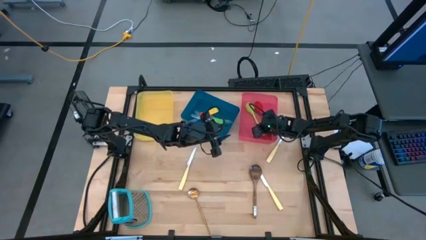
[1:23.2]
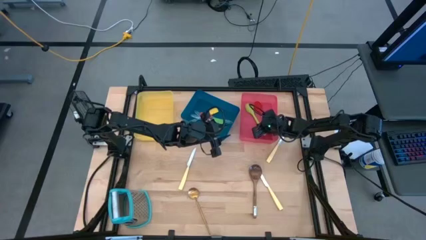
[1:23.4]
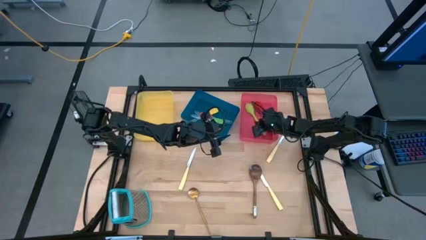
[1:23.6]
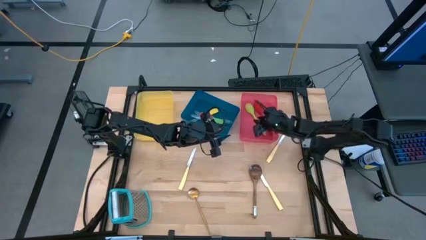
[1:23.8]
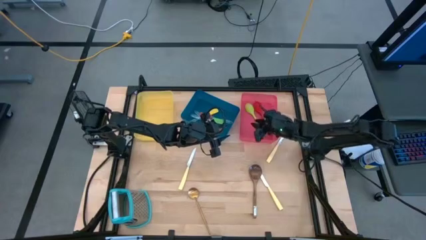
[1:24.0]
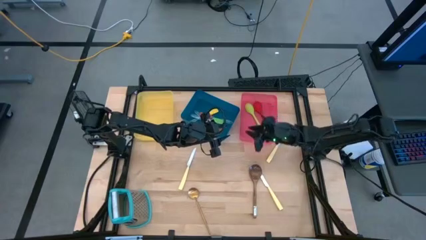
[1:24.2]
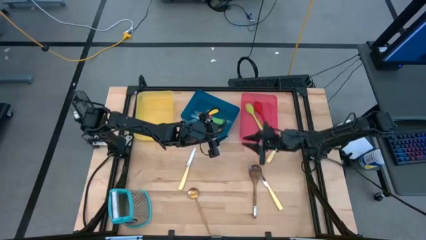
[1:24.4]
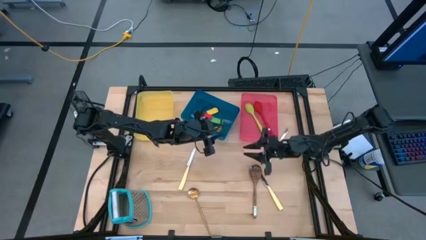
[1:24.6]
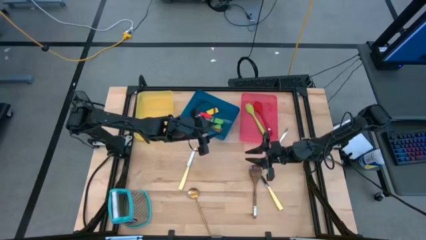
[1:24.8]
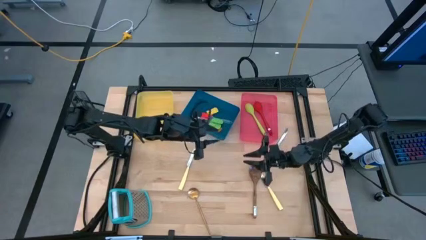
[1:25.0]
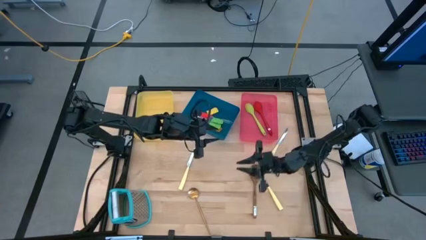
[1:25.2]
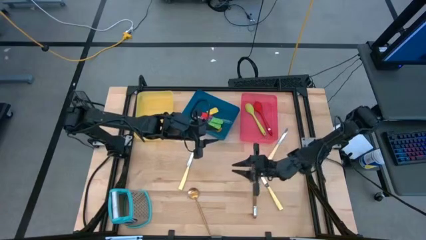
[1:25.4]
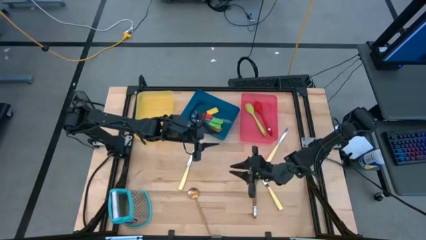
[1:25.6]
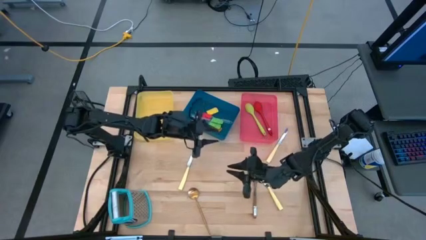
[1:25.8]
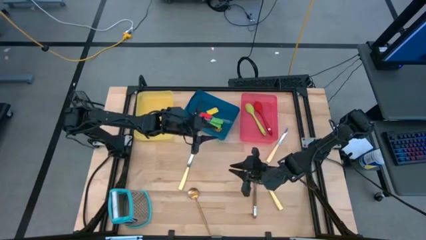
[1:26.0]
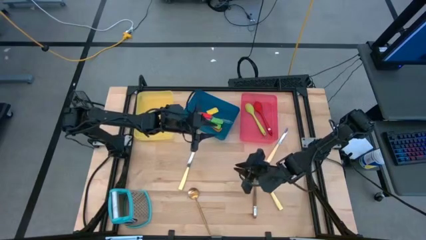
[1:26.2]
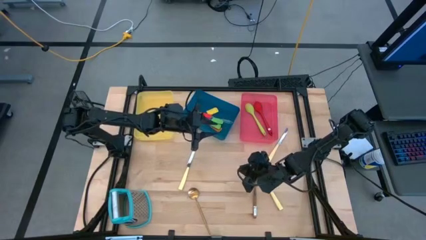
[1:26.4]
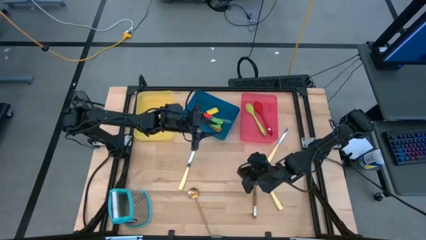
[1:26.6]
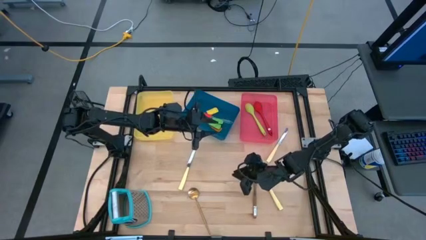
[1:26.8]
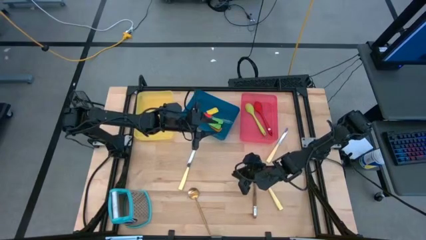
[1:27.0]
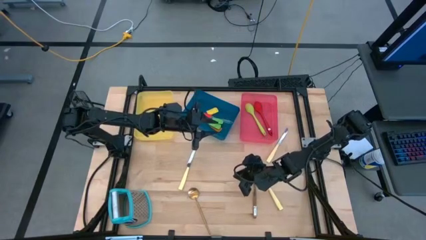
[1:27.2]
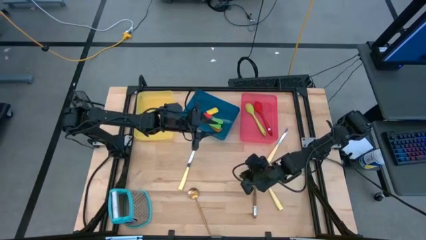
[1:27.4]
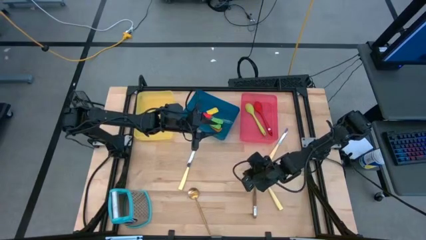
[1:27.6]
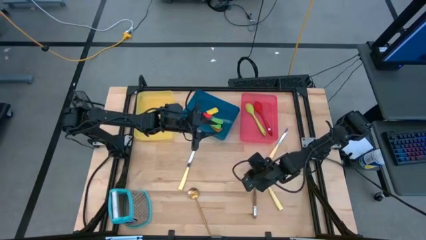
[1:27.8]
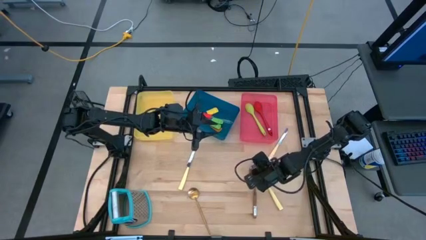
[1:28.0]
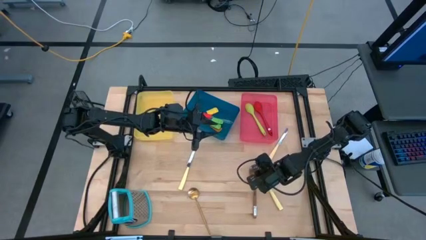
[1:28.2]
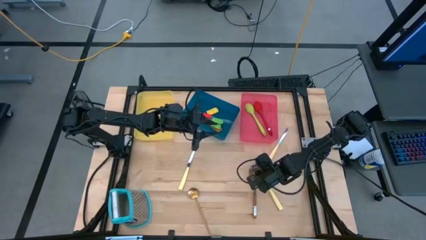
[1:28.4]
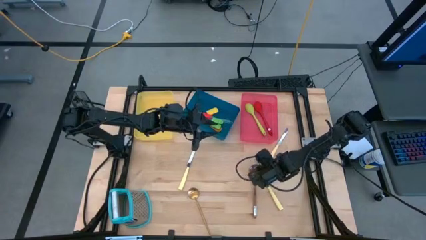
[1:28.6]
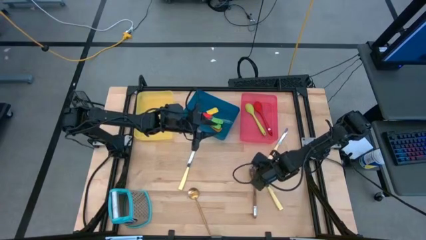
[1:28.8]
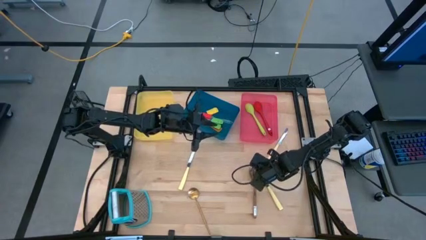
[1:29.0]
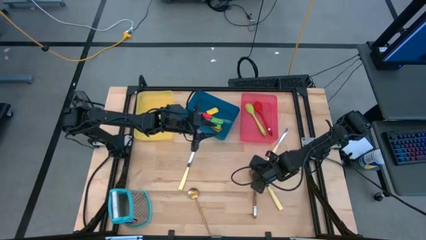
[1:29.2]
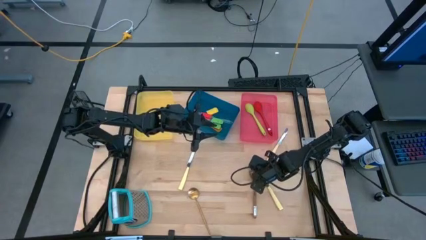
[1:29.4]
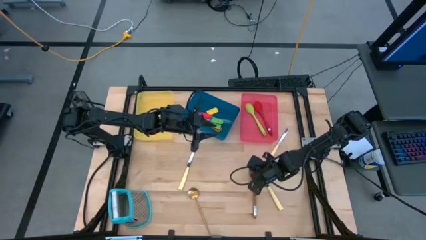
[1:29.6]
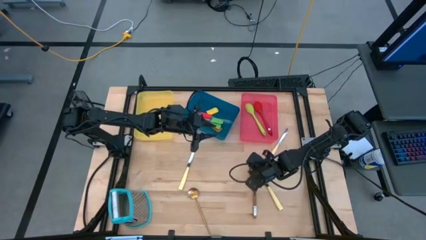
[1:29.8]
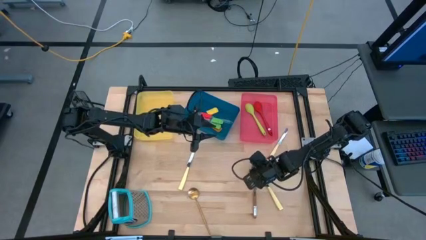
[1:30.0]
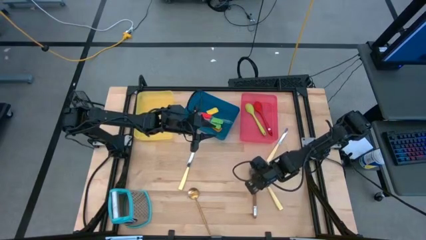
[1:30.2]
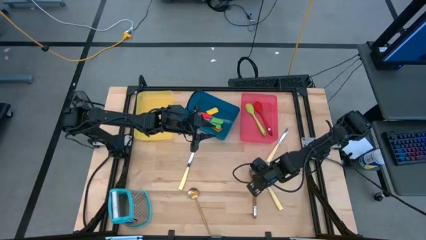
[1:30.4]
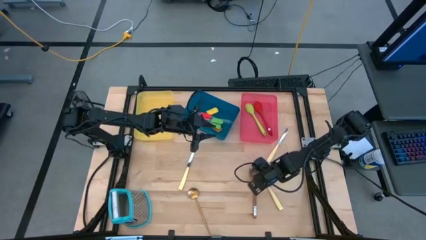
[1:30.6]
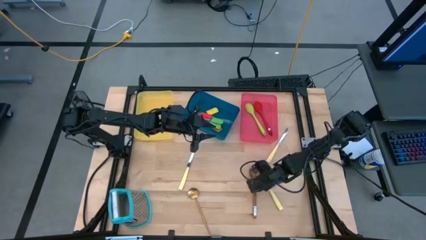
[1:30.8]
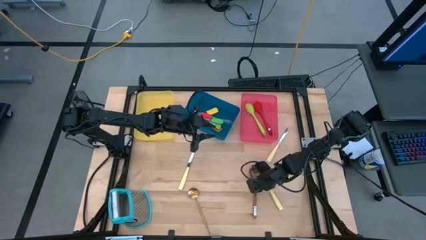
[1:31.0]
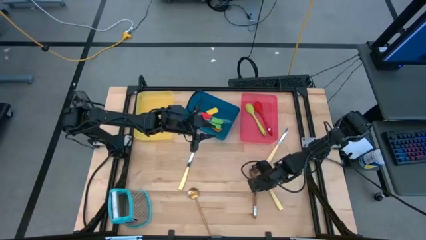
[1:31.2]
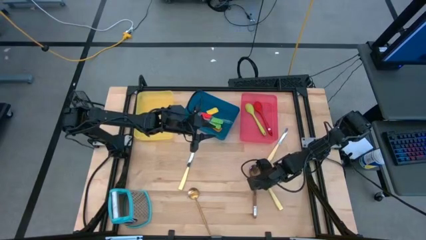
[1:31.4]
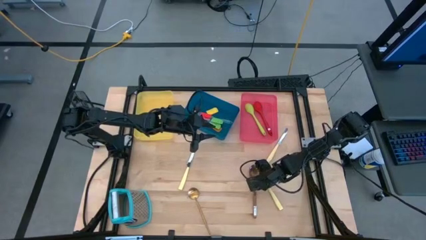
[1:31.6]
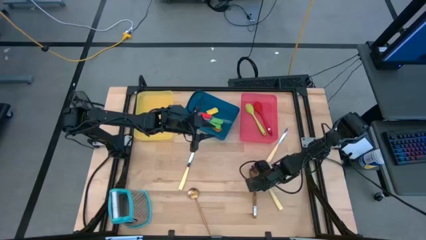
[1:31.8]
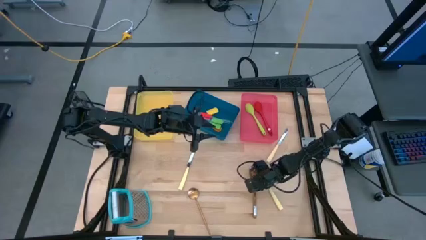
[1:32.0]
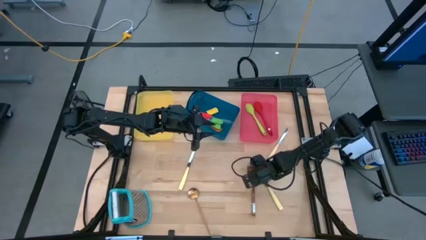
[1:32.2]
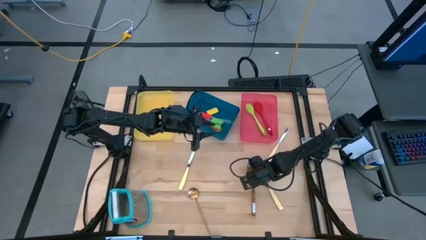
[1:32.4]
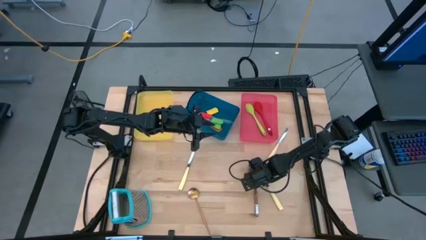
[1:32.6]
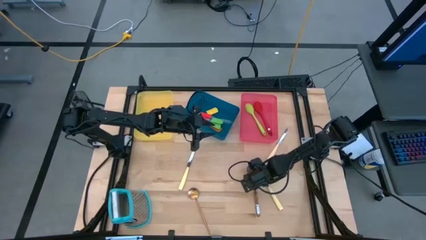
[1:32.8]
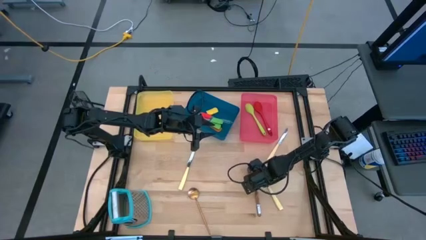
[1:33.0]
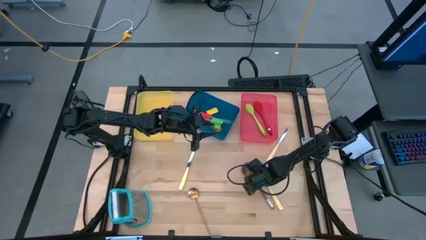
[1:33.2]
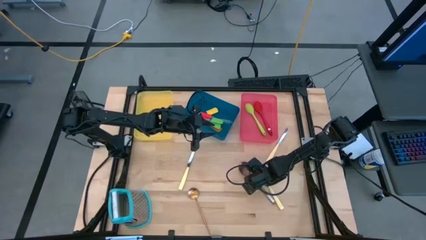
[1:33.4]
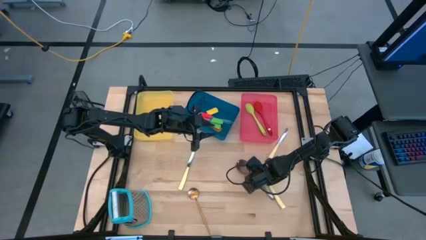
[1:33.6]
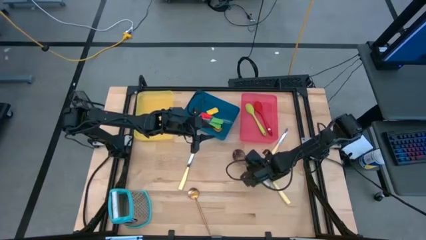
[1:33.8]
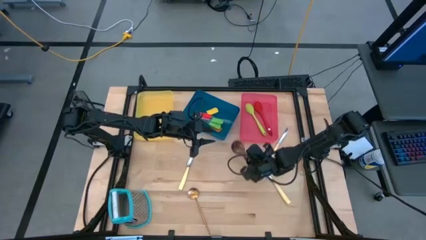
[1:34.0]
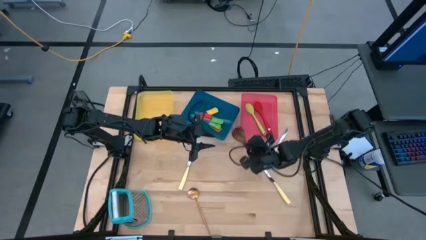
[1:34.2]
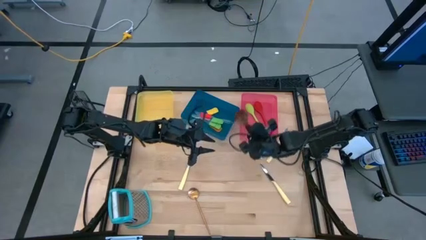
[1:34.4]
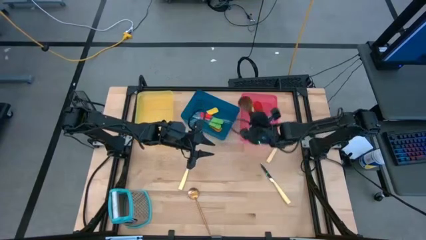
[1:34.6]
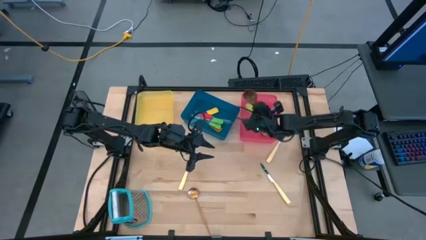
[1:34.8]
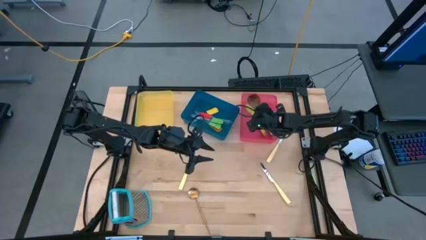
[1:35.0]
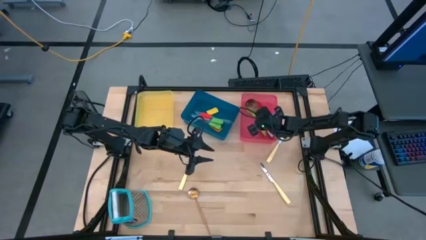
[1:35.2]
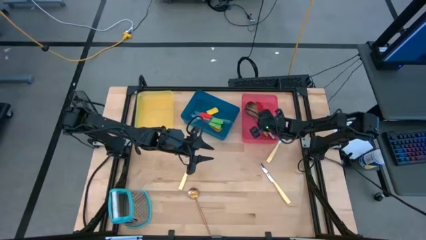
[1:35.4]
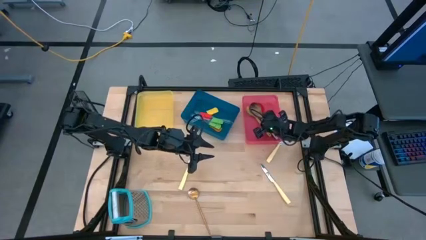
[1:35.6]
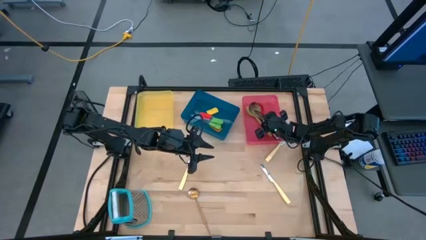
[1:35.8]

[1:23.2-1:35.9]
Task: Pick & Place Kitchen Items
Put the wooden serving spoon into the pink bin

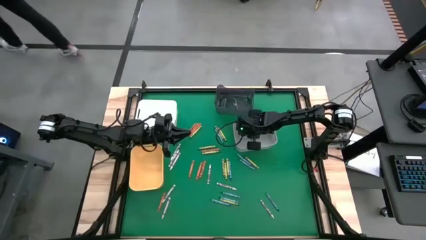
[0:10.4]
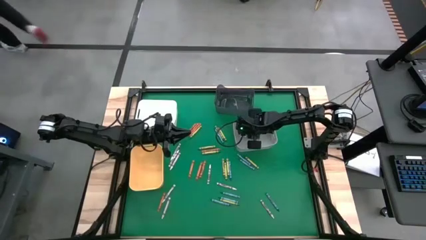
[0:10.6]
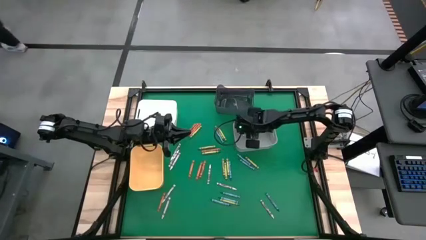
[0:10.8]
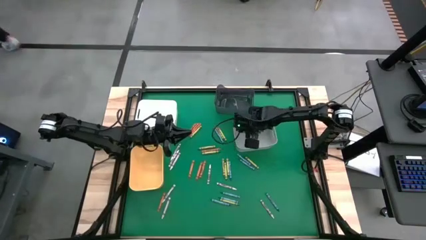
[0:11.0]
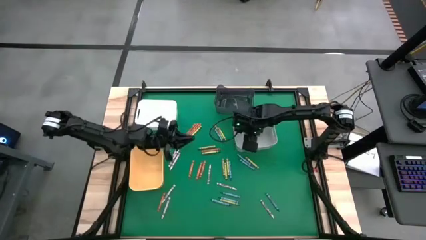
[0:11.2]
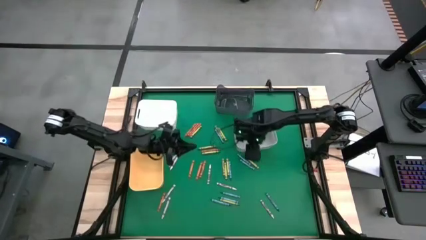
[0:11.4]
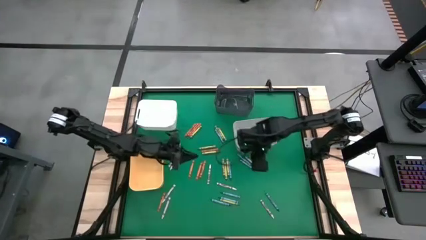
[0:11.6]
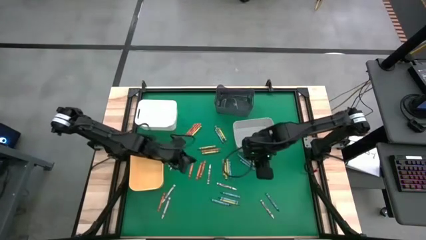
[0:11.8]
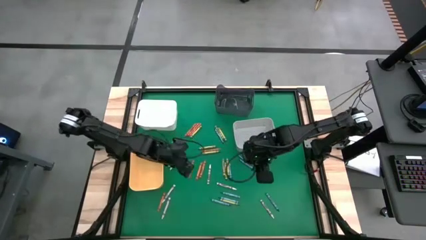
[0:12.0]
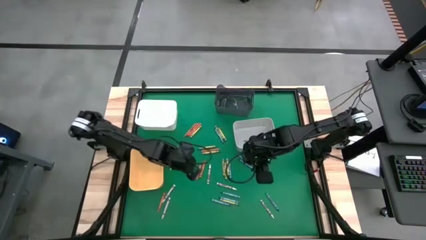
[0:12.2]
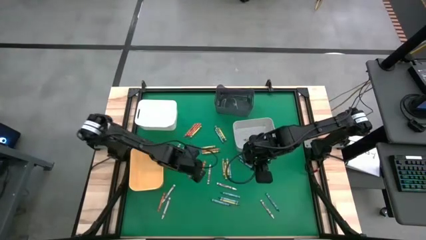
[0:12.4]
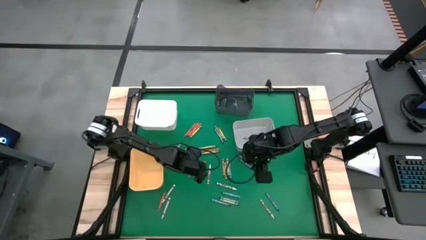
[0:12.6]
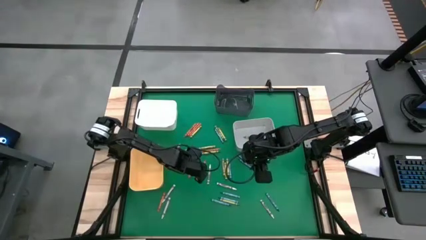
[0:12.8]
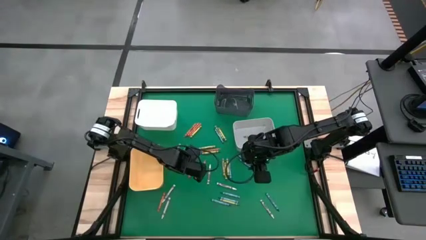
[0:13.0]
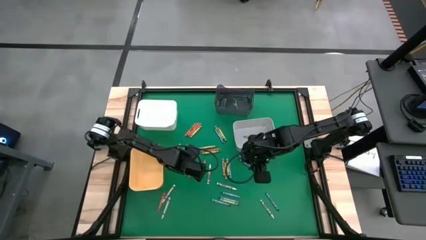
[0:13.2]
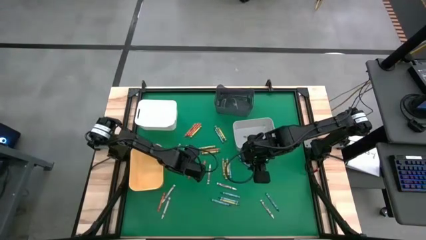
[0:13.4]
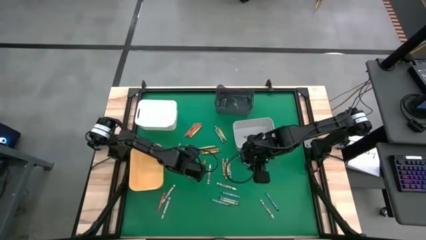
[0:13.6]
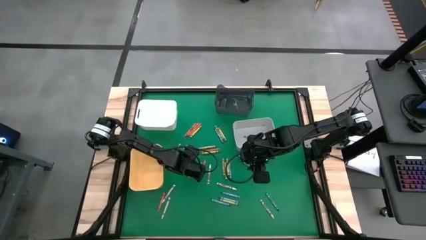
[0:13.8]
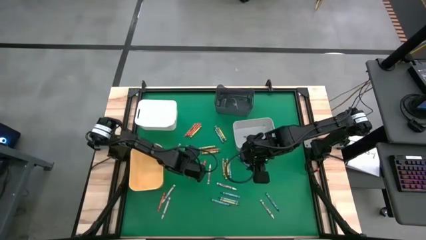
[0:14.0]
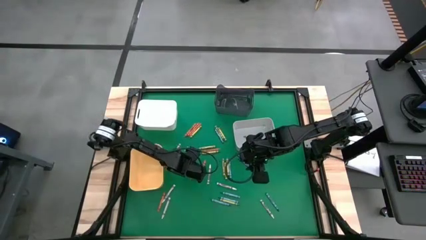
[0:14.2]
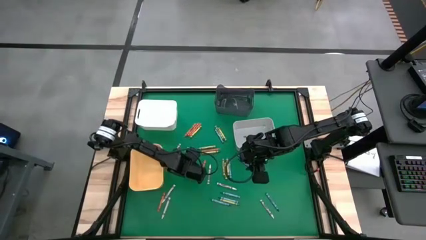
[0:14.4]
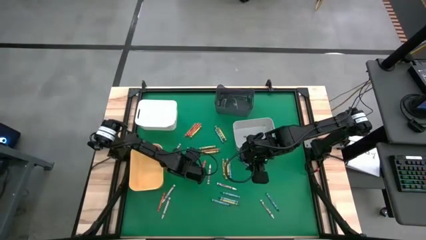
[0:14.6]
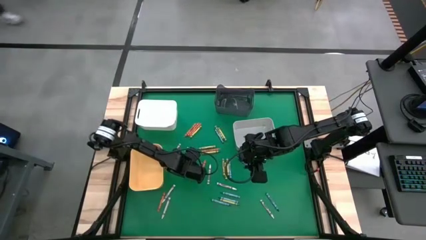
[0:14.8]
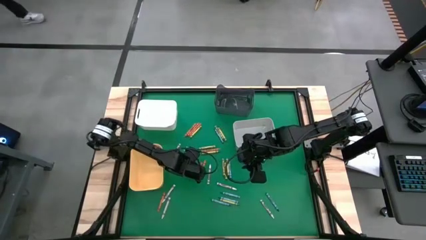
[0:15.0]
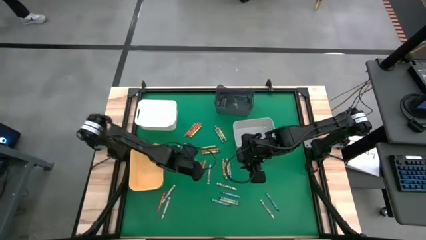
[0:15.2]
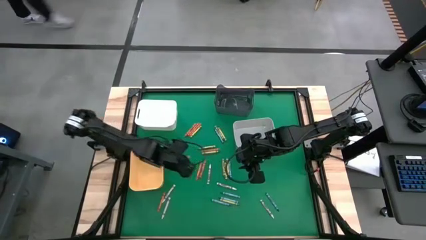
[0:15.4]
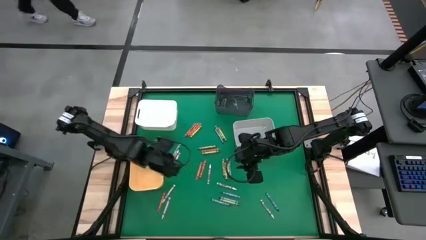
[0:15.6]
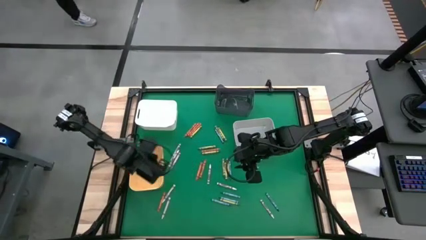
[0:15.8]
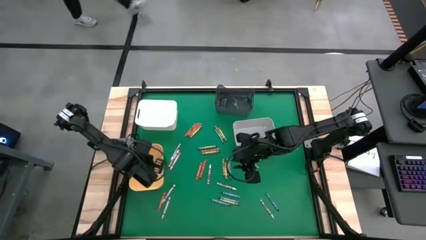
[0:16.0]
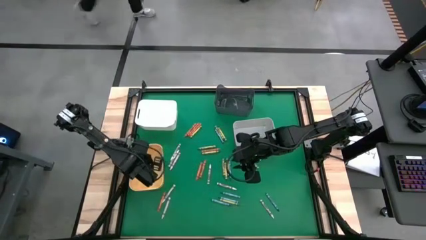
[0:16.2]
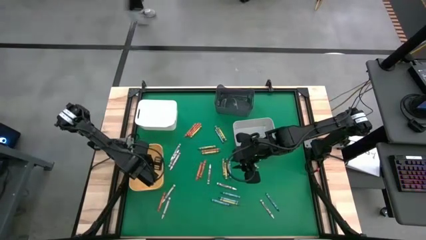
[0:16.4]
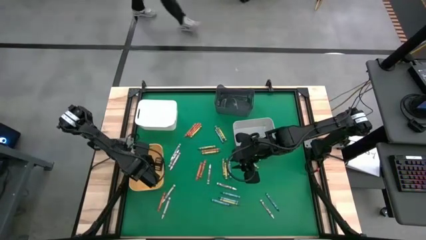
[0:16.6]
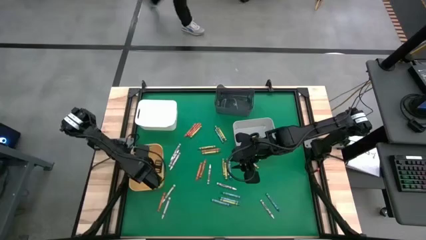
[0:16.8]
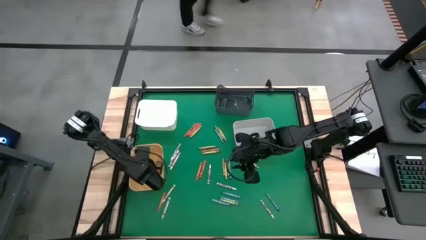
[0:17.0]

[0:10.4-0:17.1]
Task: Sort crayons
Put the orange crayon into the orange bin
